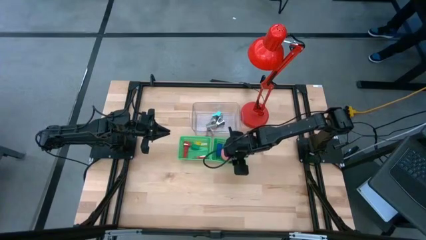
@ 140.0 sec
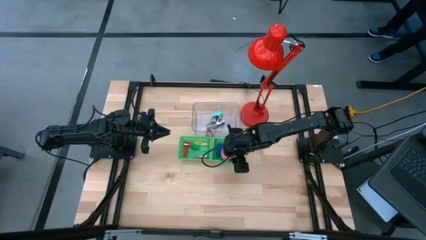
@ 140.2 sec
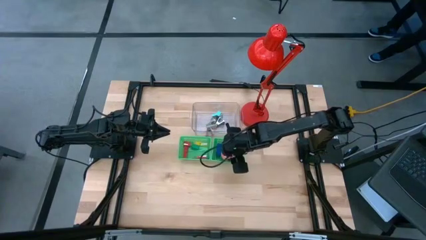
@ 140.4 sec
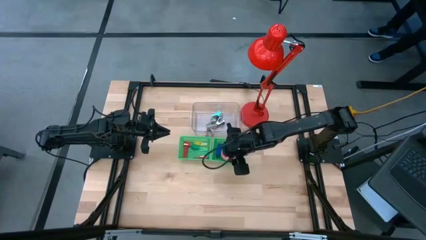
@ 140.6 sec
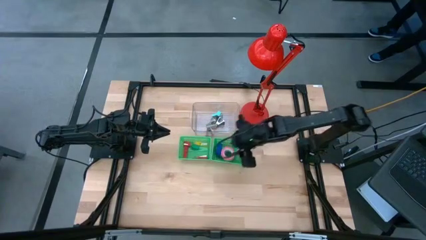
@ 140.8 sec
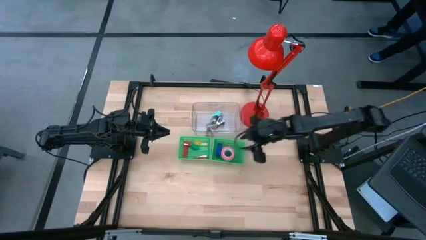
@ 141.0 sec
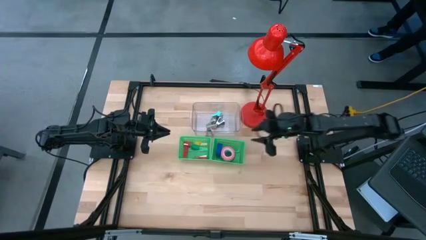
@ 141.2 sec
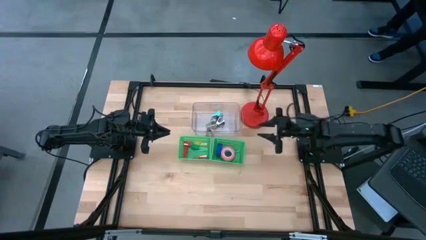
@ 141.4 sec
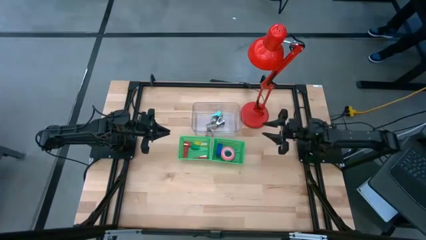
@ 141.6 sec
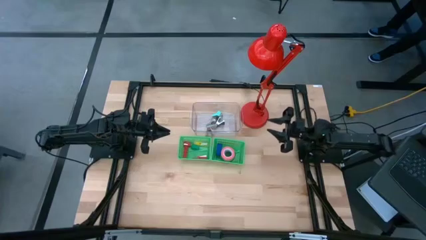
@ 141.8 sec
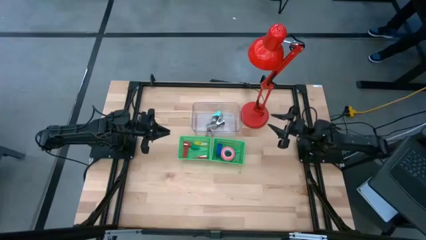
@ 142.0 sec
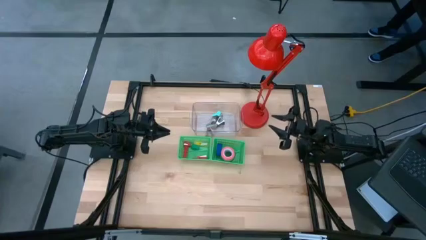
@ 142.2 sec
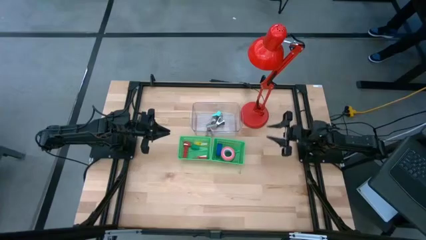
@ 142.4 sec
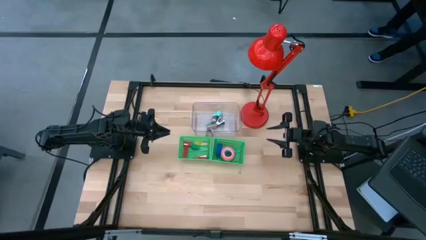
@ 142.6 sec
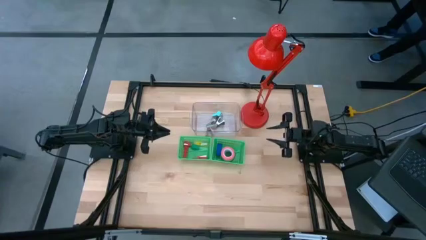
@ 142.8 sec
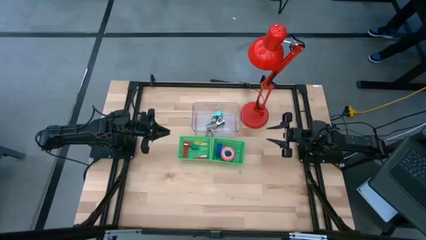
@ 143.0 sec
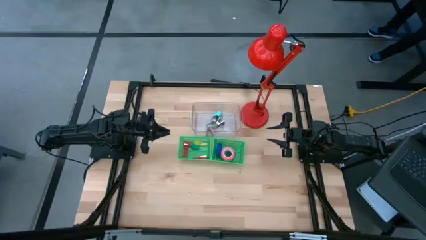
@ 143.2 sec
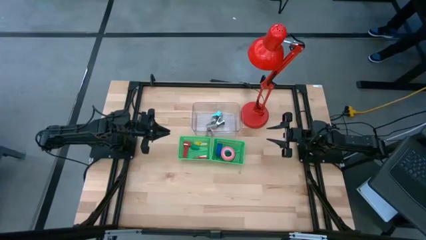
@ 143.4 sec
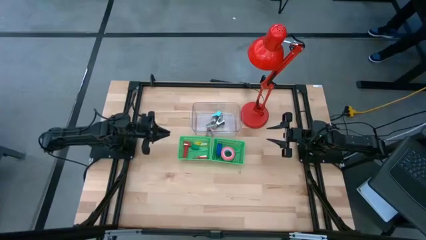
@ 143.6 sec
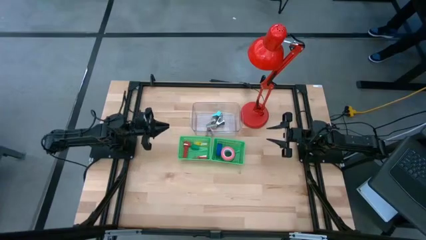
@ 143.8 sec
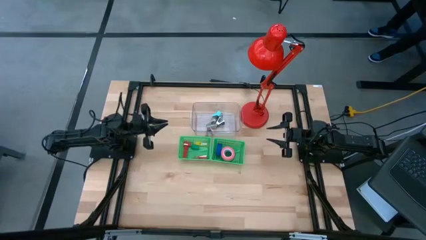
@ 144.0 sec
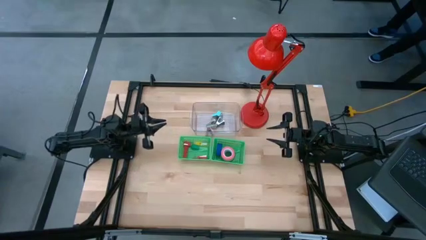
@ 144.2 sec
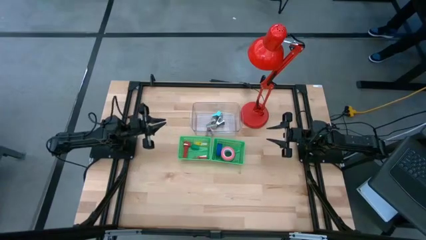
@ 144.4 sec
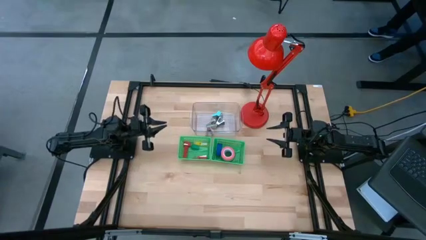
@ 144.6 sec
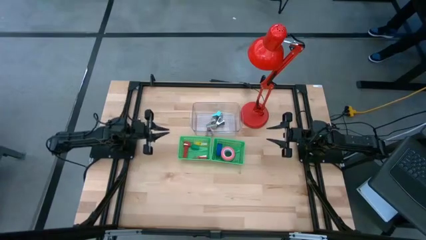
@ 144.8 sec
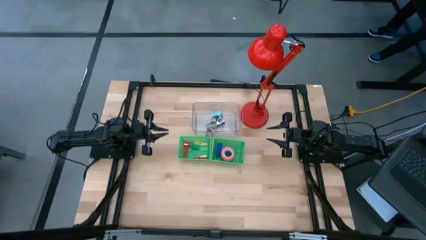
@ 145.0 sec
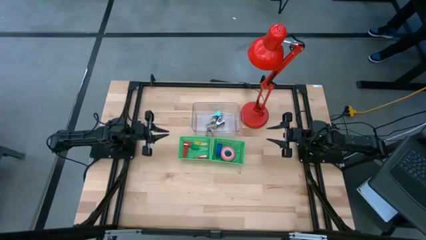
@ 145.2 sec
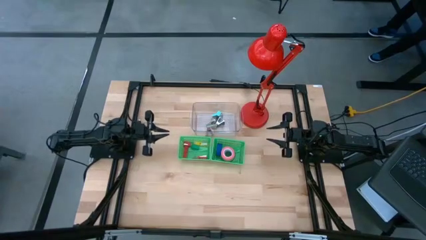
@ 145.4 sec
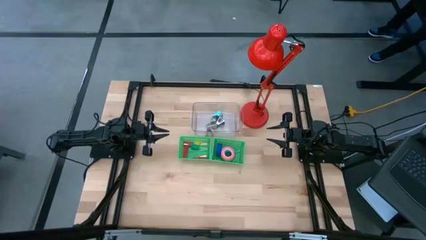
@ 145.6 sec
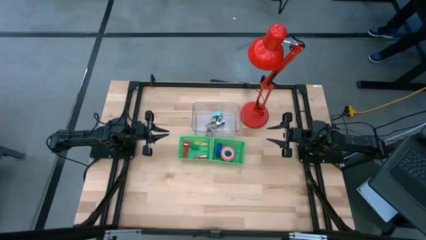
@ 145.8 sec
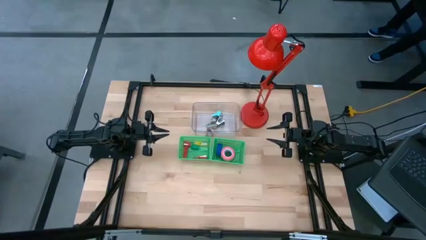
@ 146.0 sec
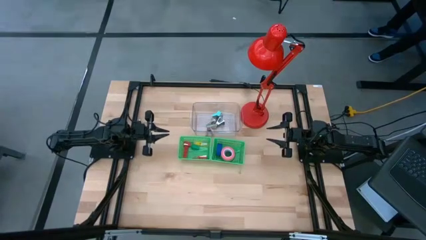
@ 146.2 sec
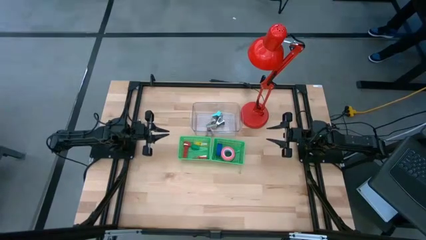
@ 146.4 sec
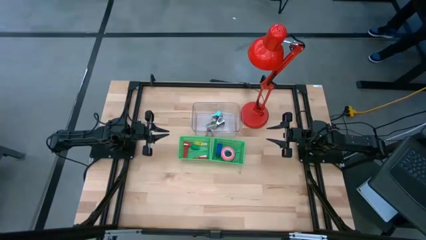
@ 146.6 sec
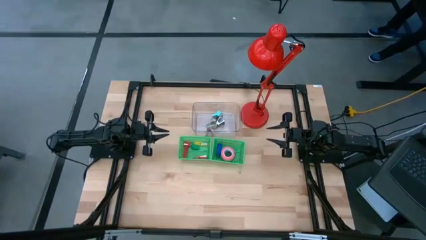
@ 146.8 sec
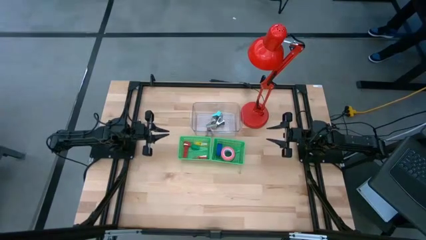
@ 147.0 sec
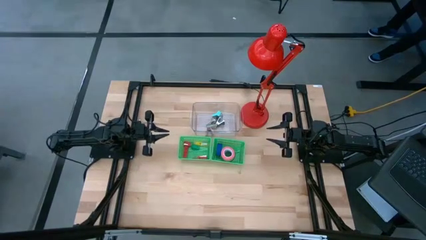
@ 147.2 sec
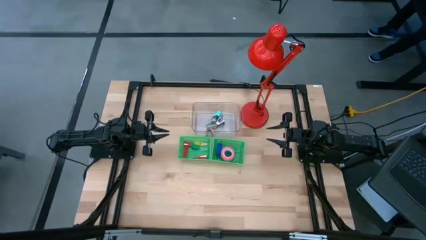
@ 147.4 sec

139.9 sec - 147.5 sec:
Task: Pick and place Stapler, Stapler remover, tape
Return to Home Position

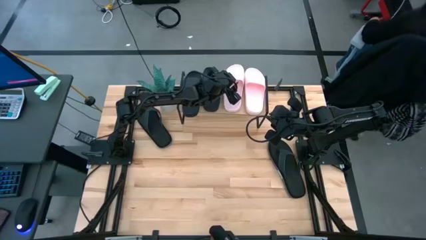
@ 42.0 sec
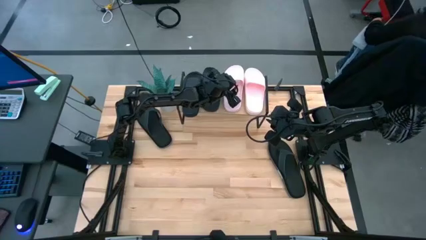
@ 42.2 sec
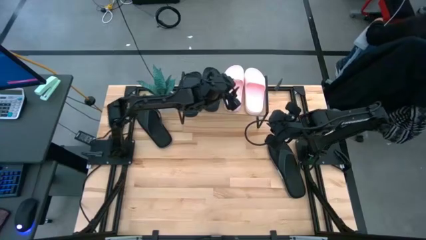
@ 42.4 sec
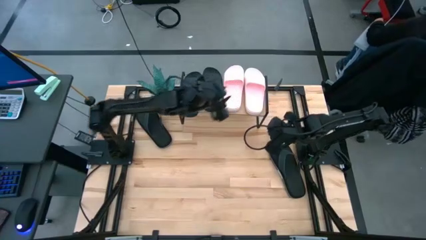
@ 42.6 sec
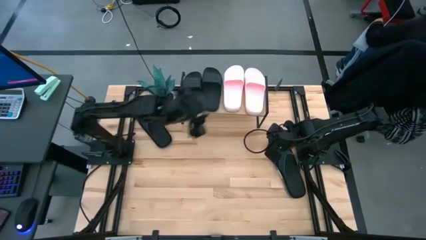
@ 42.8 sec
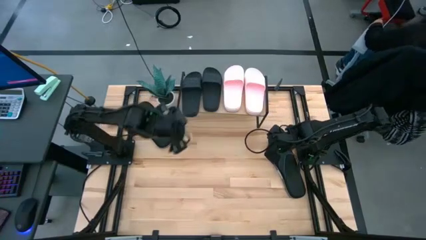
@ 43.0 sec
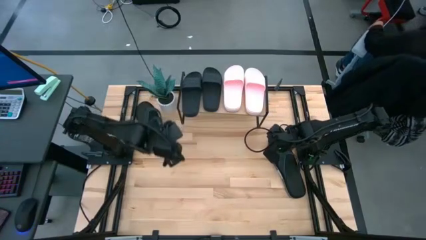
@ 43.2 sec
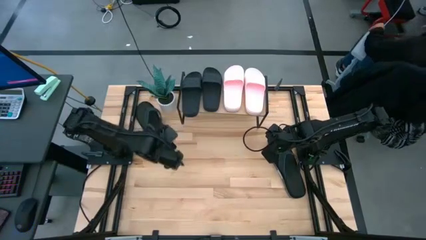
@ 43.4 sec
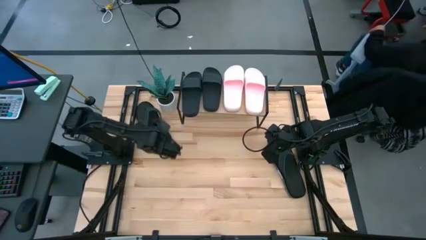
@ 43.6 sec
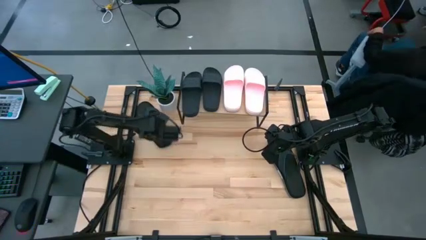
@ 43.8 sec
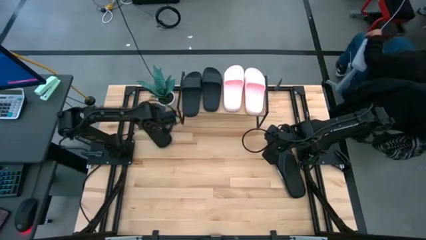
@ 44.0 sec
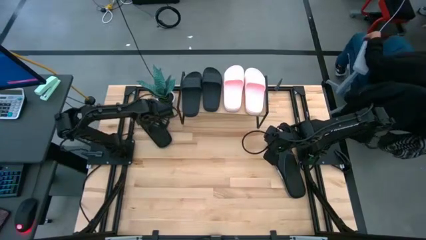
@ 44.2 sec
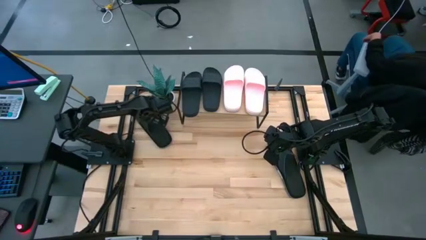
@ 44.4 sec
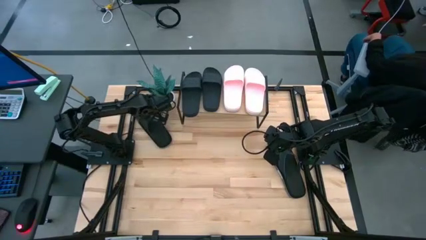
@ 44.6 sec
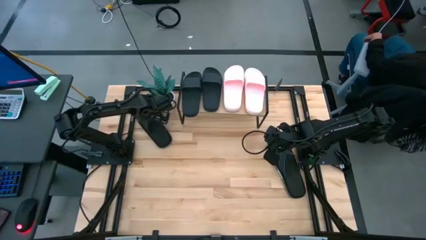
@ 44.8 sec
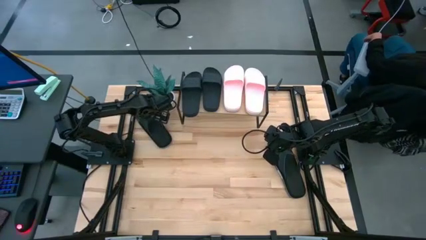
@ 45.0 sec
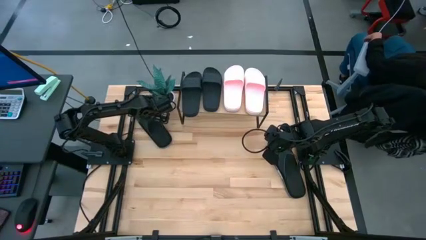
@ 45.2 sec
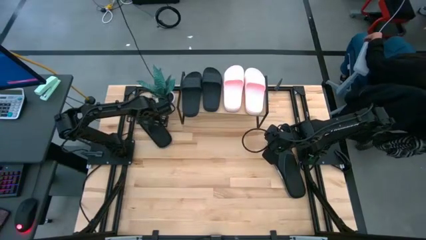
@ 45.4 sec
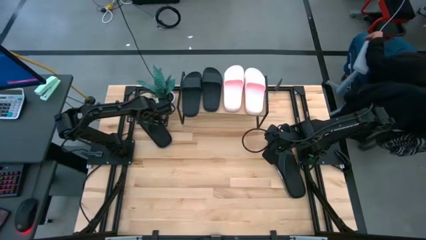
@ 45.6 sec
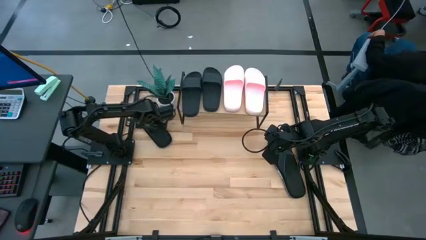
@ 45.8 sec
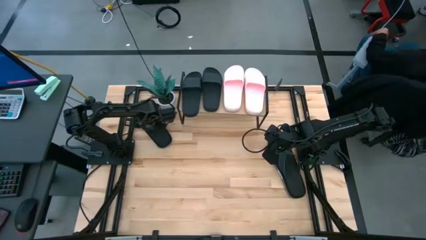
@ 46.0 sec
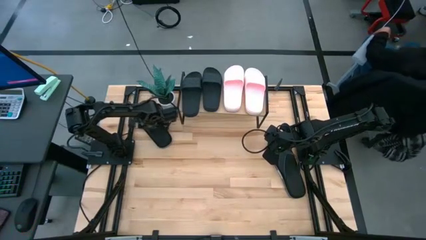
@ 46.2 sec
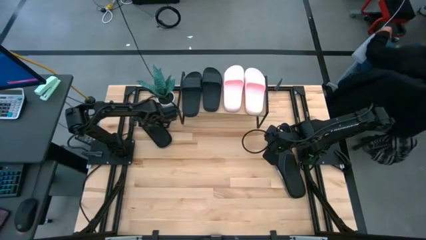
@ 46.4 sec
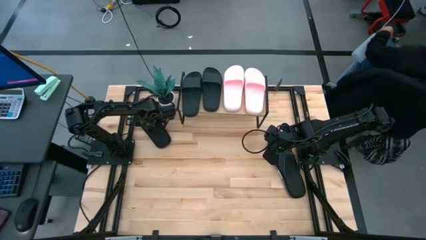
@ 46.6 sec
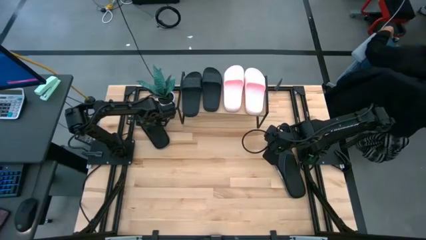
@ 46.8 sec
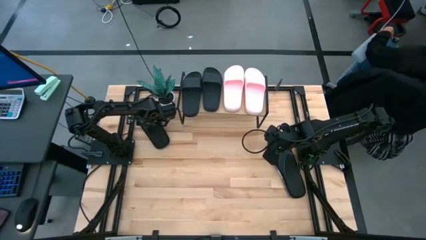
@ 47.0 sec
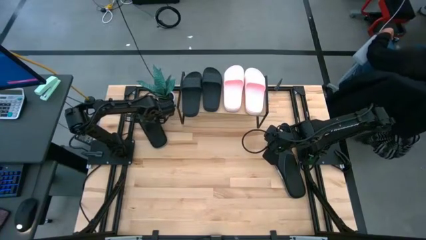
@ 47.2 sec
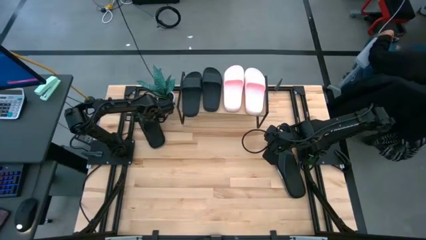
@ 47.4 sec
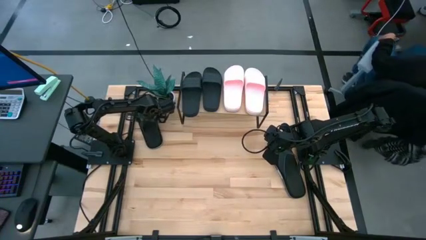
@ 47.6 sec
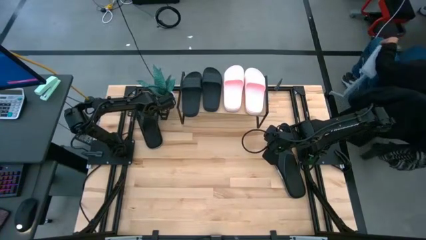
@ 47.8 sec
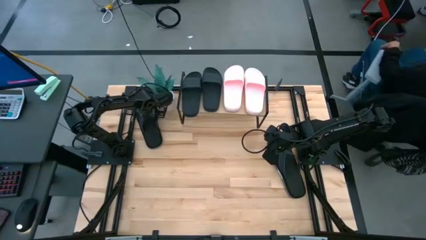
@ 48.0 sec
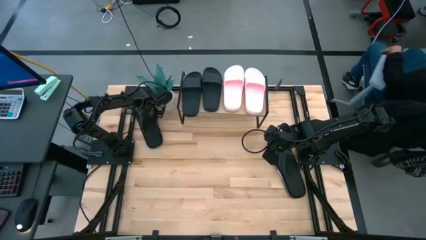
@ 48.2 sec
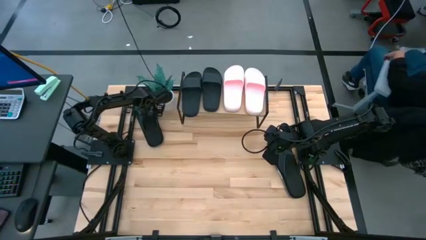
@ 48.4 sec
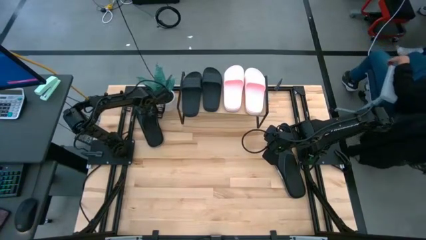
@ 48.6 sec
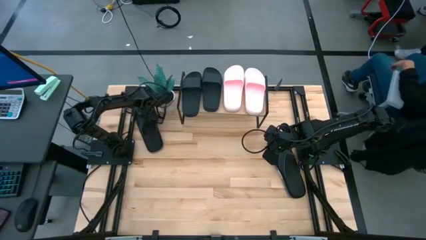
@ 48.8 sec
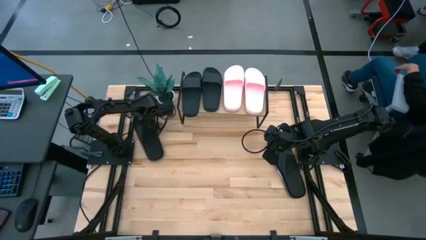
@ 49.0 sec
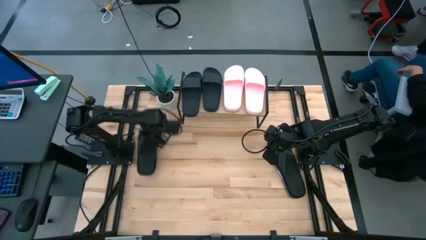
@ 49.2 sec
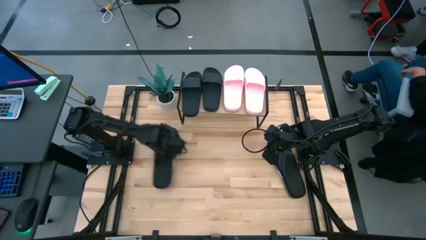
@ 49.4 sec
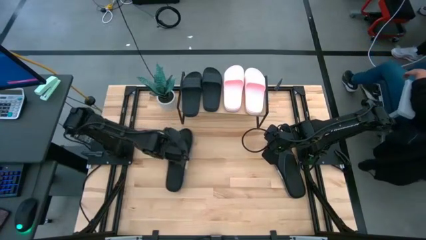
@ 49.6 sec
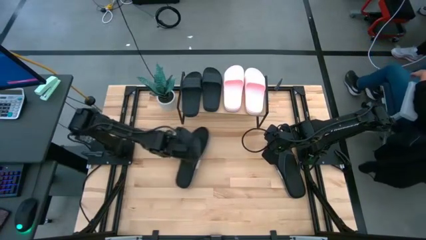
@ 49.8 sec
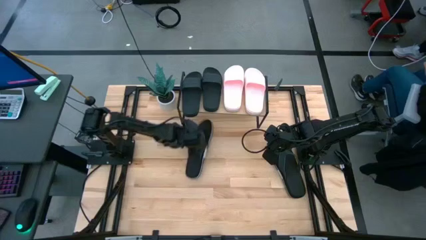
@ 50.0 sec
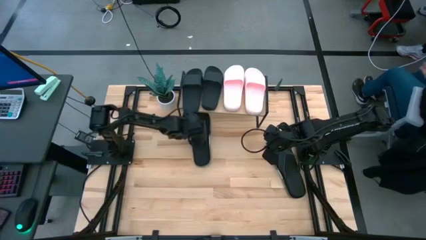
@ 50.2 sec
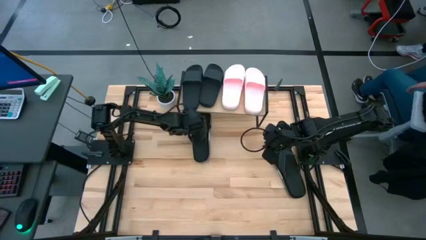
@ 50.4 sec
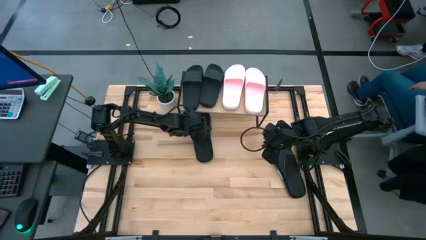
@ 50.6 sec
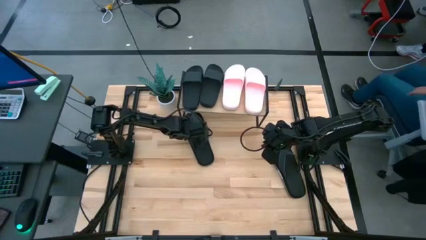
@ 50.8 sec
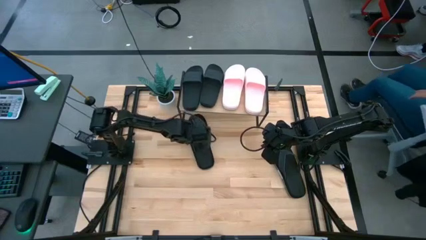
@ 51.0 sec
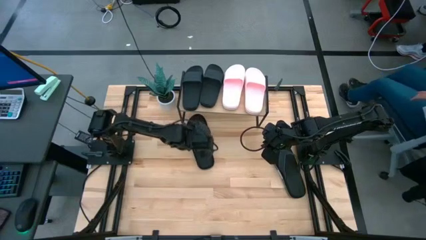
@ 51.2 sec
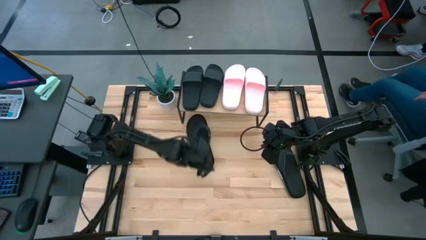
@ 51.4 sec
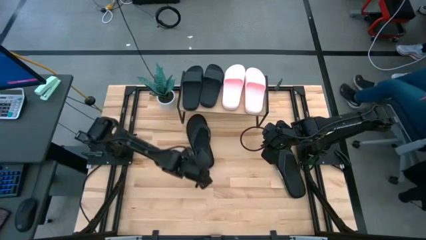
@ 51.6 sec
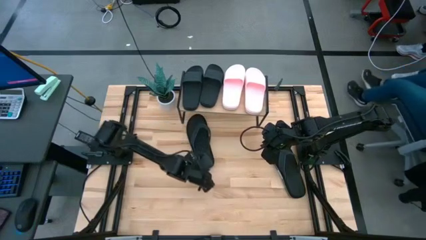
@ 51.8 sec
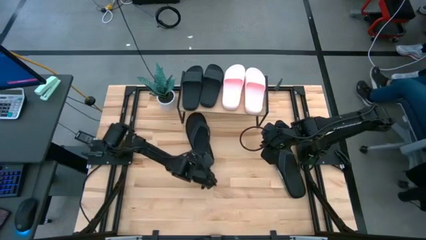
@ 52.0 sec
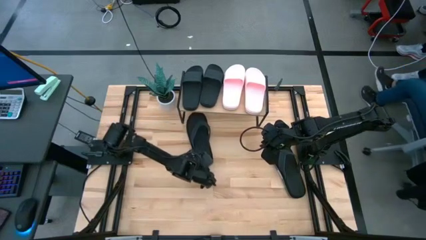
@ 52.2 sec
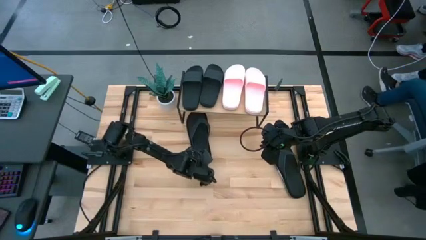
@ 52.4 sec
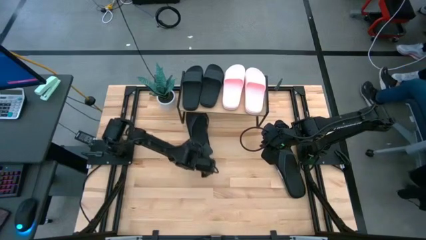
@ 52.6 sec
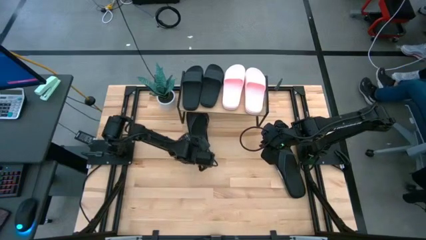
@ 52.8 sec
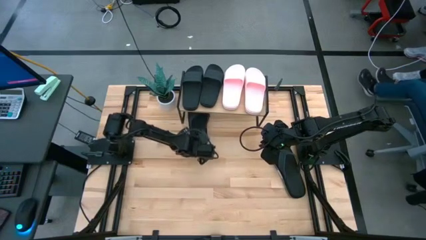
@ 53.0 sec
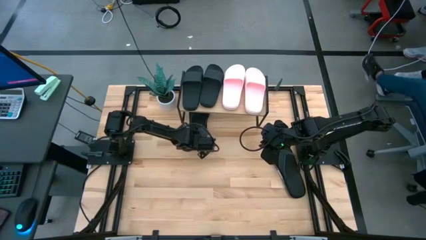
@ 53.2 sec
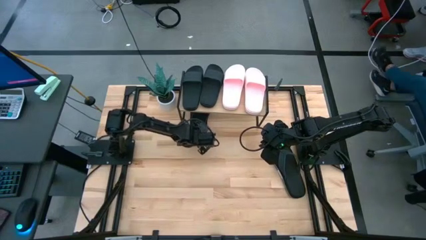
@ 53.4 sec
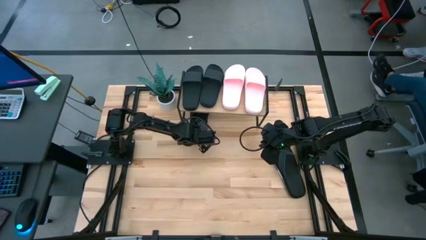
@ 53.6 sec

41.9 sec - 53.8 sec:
Task: Pick and place slides into the shelf
Put the left black slipper under the shelf
